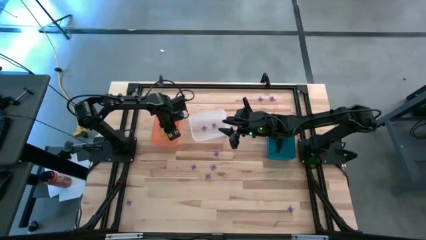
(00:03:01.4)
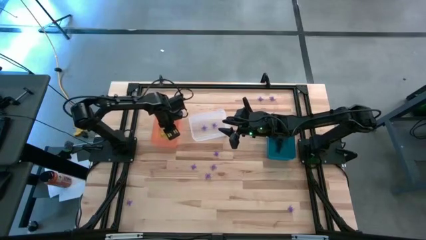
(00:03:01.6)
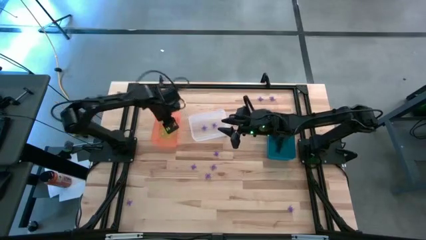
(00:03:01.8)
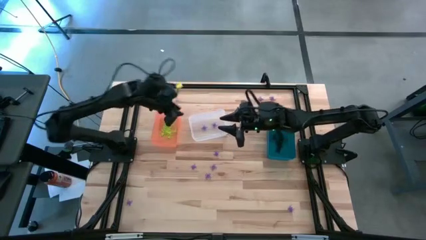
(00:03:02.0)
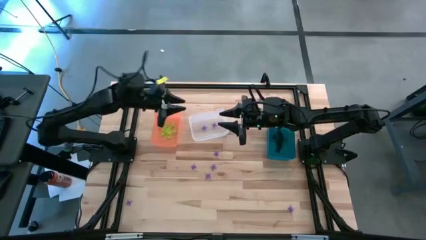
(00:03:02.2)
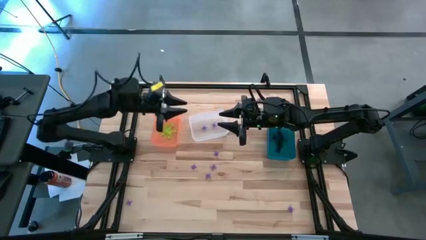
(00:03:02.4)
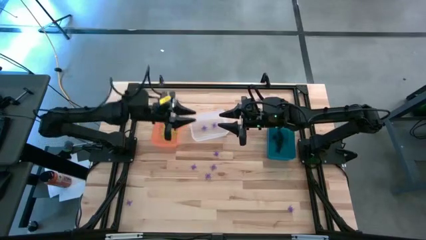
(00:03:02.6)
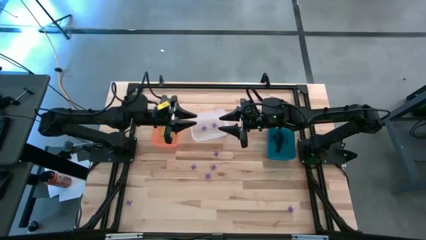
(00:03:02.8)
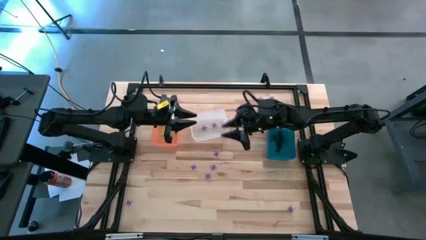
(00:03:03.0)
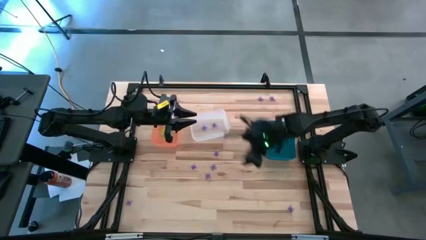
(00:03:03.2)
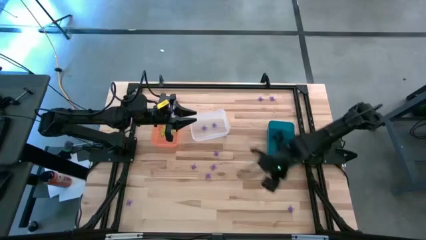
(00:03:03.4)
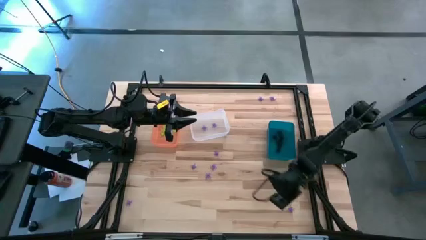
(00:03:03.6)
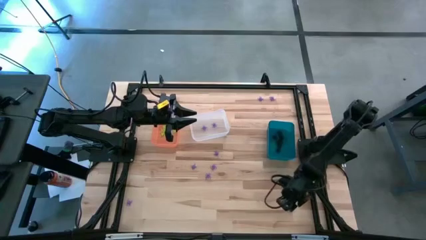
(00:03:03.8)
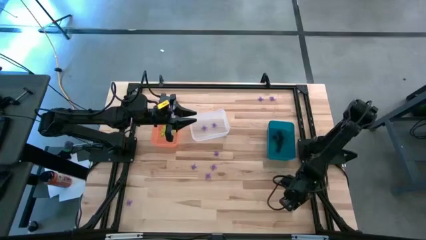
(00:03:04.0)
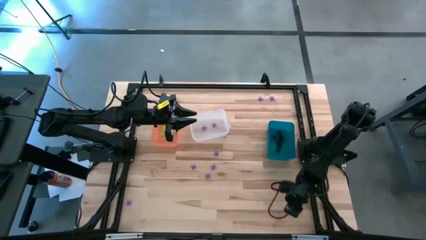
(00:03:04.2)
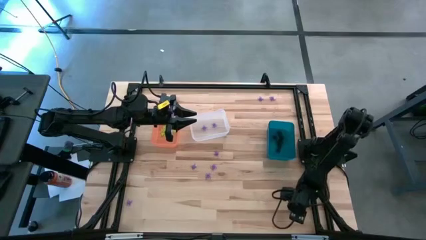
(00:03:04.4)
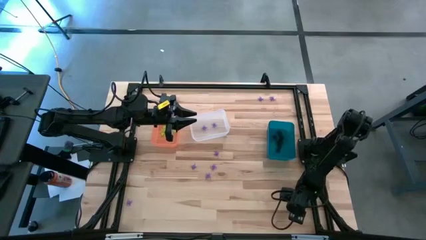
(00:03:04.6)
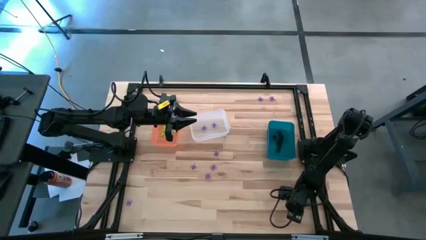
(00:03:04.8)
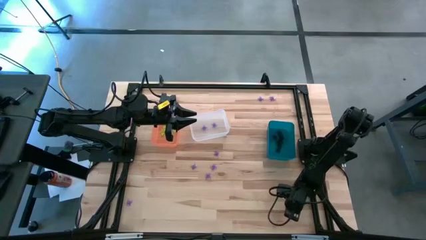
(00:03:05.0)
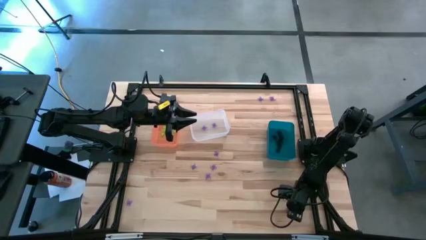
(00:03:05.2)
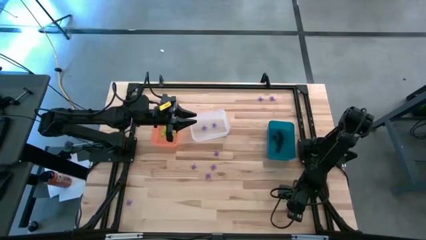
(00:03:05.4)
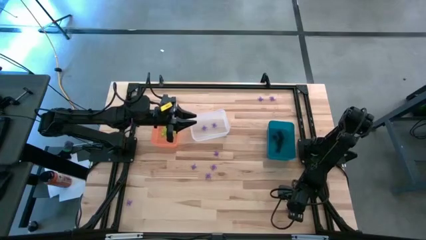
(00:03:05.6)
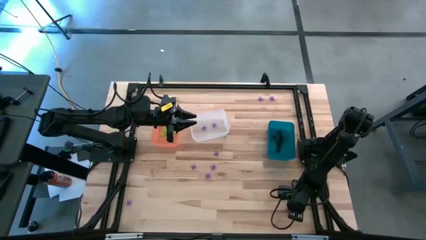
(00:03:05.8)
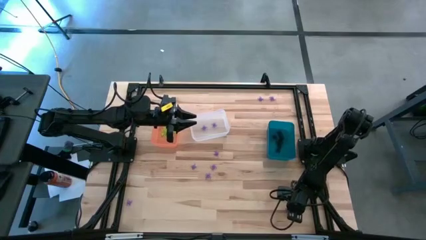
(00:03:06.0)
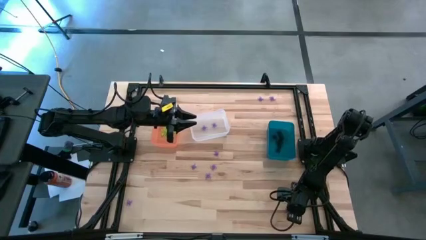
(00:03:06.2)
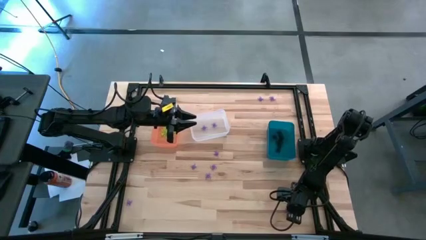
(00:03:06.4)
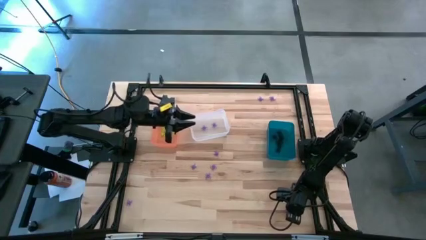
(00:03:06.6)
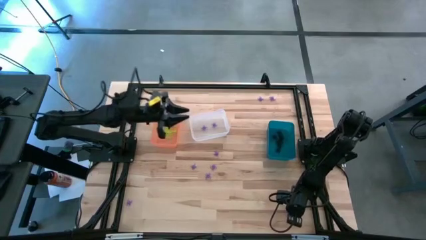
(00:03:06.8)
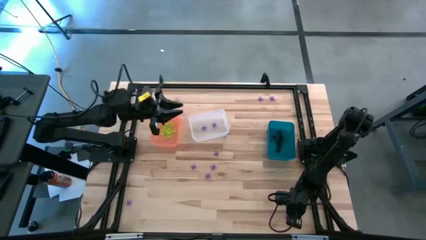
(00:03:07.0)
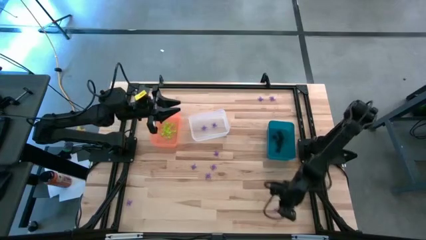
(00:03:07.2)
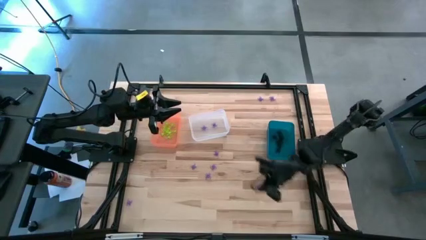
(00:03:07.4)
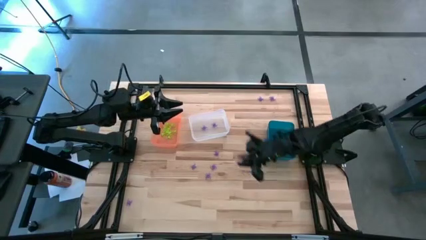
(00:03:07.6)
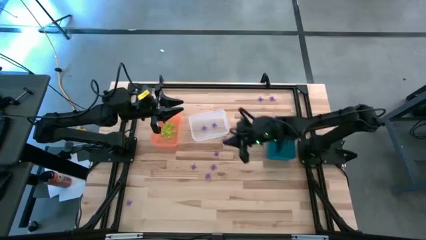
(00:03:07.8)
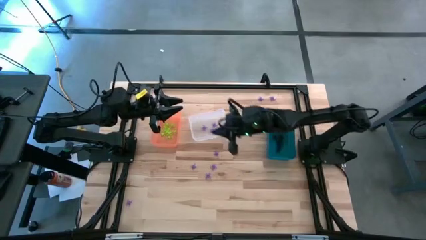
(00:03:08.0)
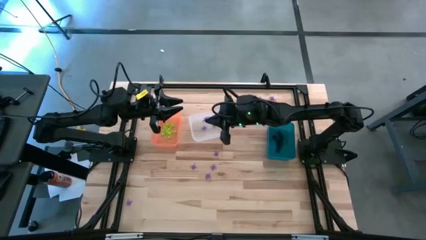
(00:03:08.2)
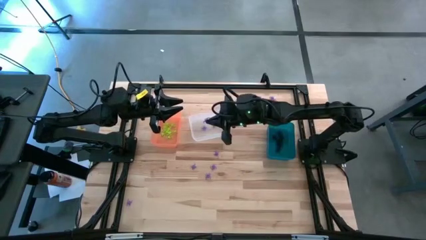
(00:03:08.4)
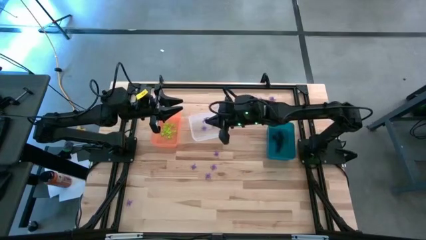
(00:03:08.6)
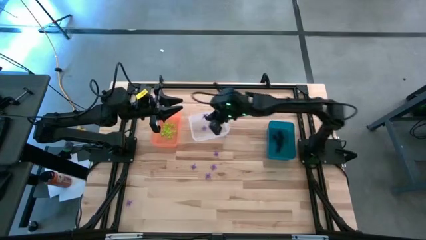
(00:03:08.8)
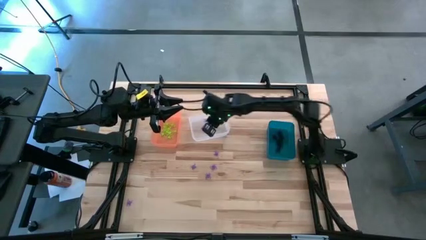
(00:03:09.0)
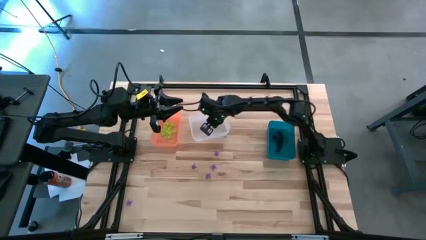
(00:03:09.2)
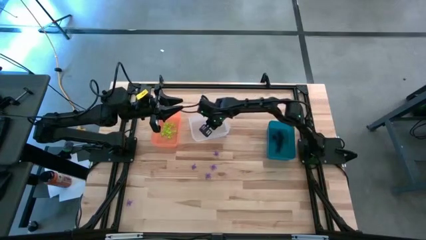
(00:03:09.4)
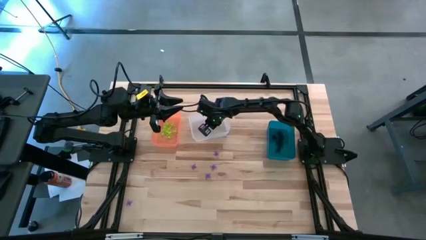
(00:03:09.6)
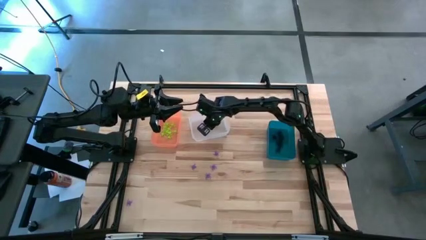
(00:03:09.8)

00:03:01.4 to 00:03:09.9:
Task: Sort Halloween decoration
Put the purple spider toy into the transparent bin

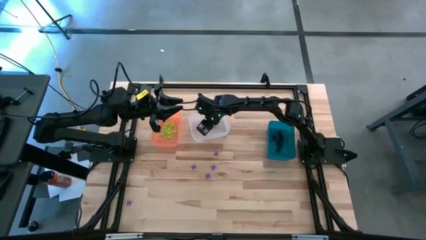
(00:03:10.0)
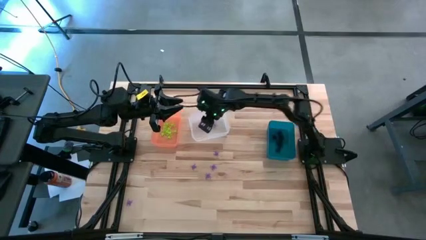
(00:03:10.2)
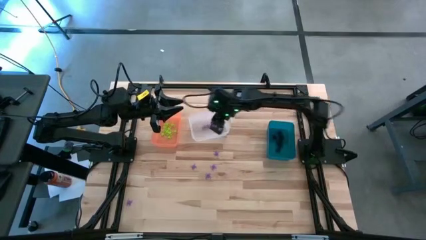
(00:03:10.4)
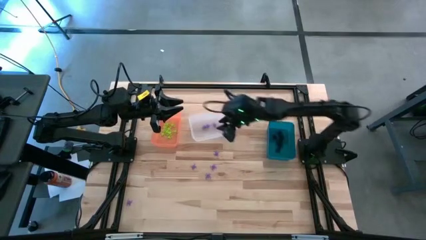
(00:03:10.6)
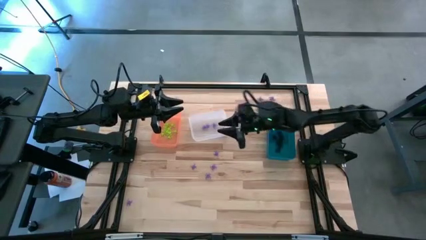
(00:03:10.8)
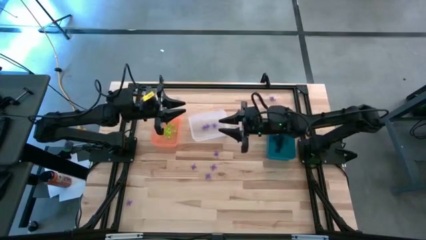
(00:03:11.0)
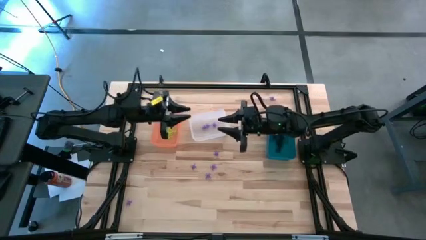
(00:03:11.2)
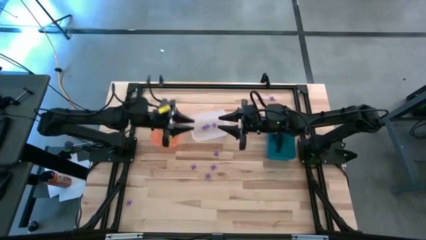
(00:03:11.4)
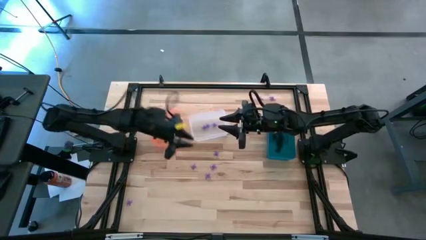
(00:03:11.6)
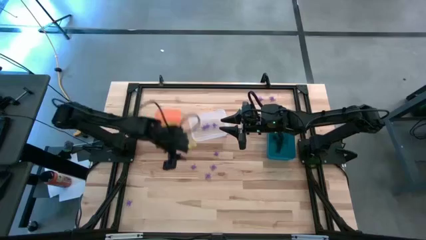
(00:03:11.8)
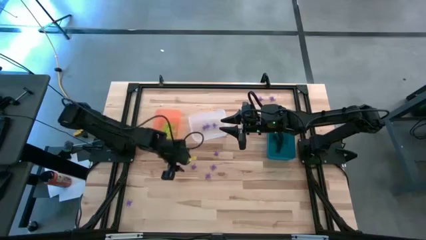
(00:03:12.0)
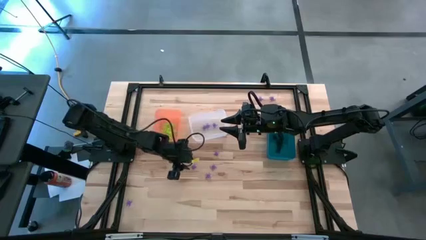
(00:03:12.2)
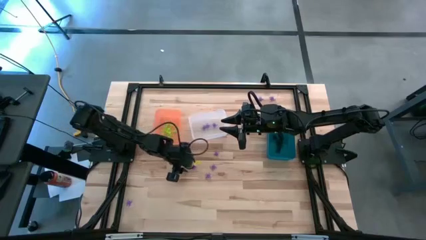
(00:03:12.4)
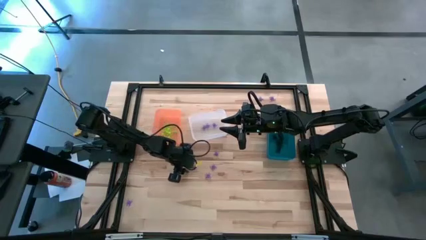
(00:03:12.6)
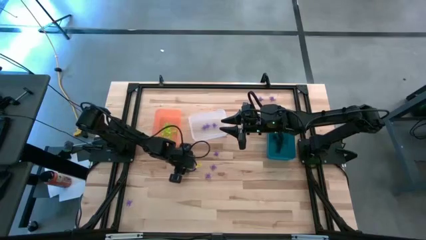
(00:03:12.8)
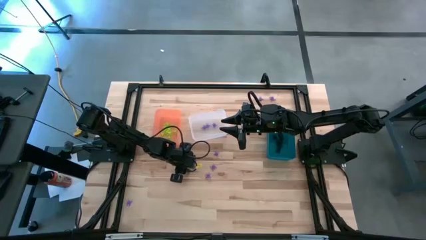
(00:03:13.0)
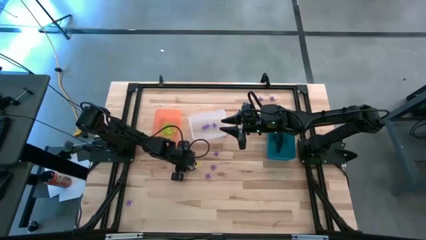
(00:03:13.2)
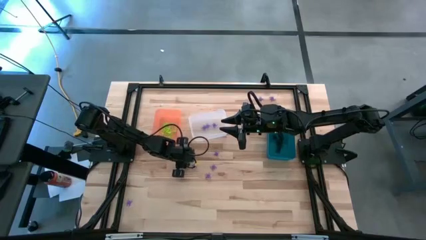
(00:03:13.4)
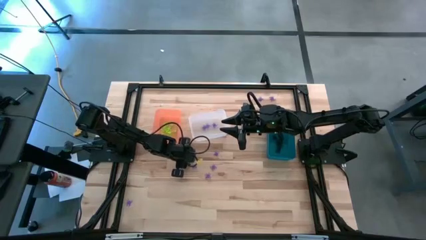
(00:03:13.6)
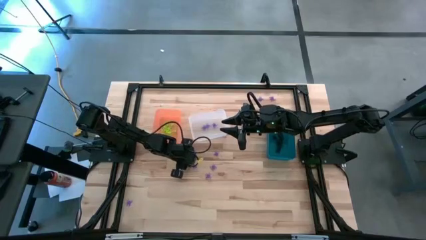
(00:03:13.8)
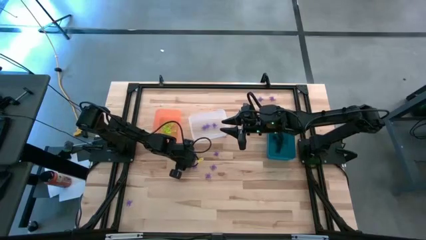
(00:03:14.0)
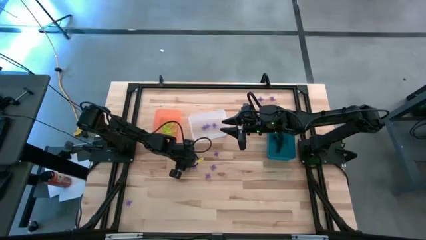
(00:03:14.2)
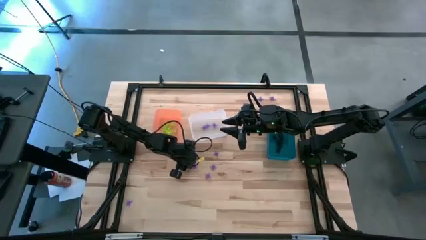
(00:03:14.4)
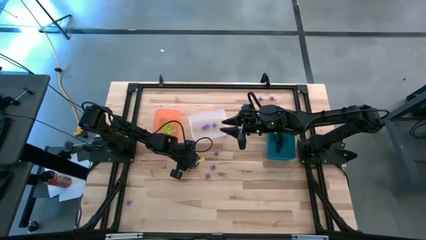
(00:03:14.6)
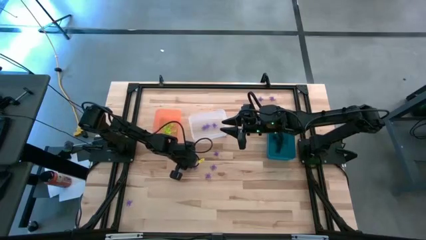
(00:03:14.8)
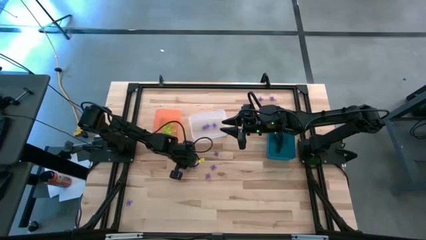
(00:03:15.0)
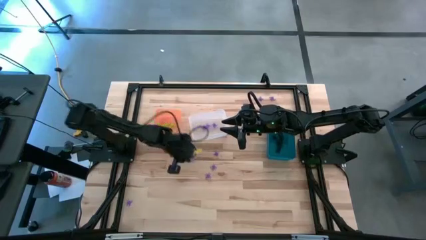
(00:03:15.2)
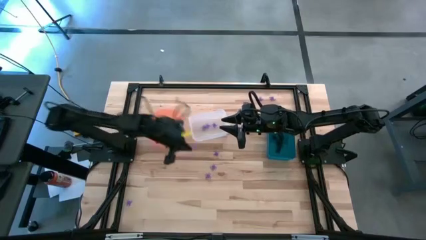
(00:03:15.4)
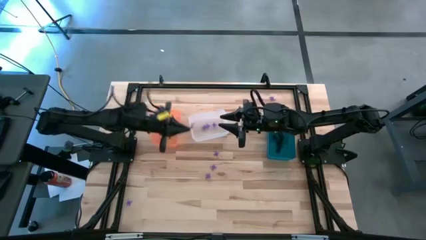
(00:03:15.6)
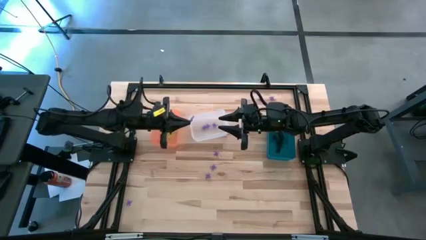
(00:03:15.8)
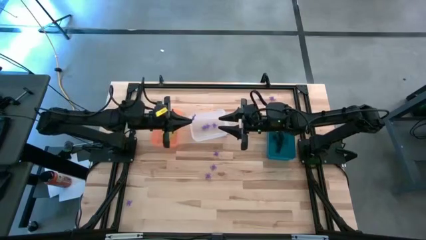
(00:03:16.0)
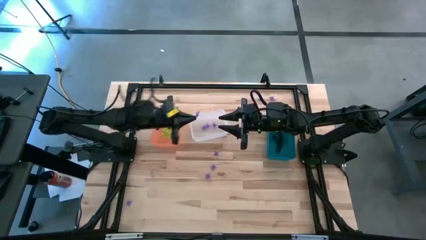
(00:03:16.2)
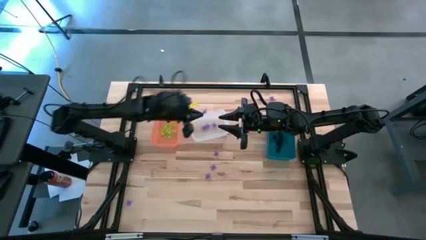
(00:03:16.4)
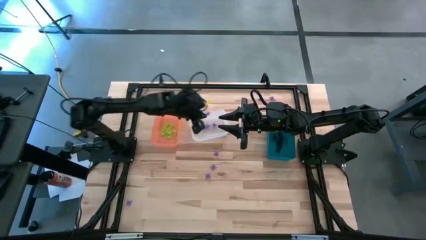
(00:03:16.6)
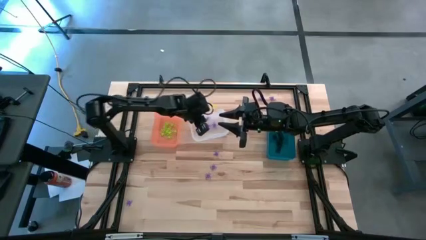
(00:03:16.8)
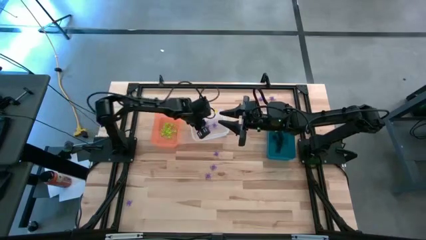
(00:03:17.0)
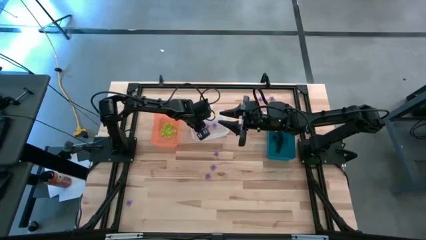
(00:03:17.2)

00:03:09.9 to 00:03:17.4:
Put the purple spider toy into the transparent bin
